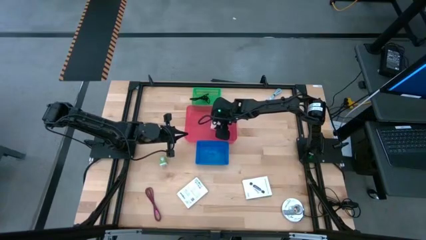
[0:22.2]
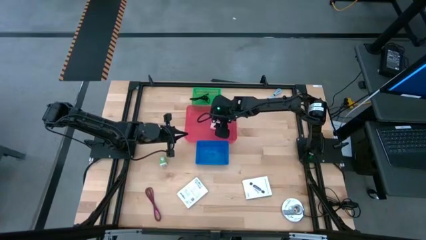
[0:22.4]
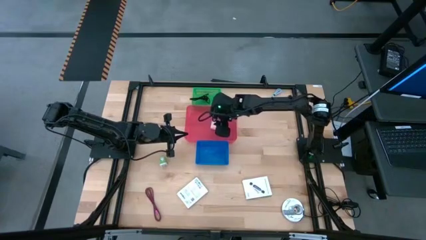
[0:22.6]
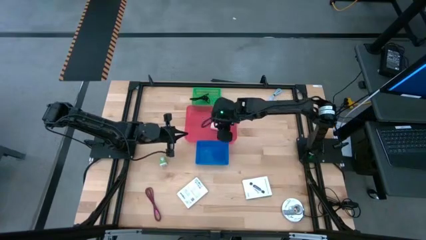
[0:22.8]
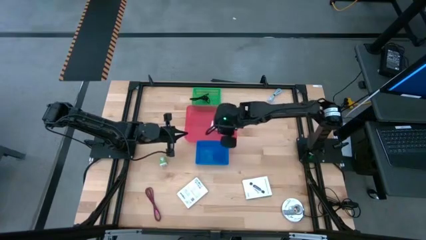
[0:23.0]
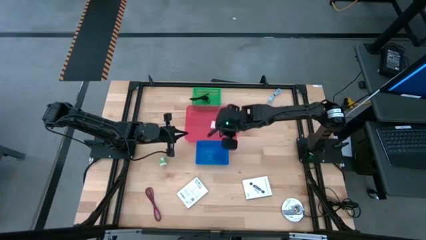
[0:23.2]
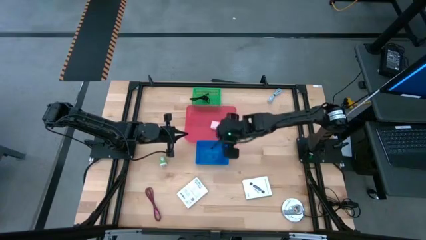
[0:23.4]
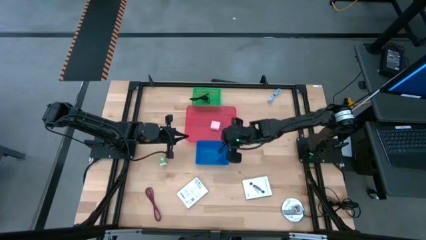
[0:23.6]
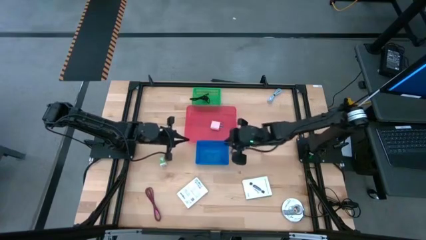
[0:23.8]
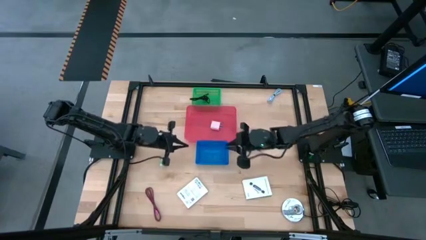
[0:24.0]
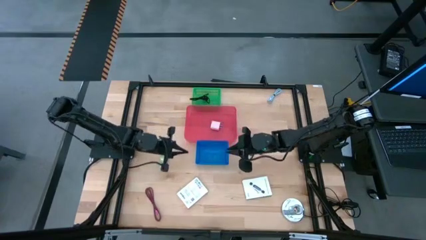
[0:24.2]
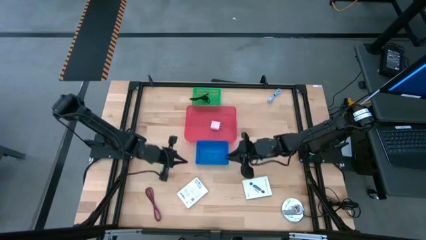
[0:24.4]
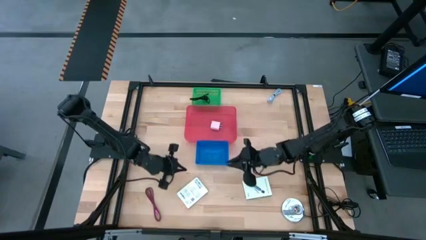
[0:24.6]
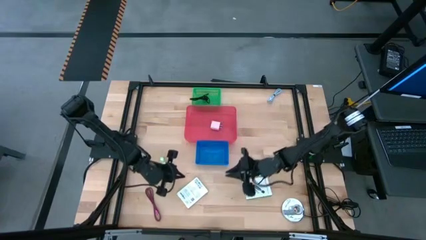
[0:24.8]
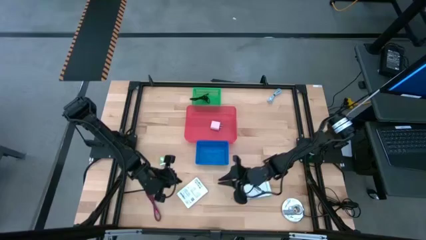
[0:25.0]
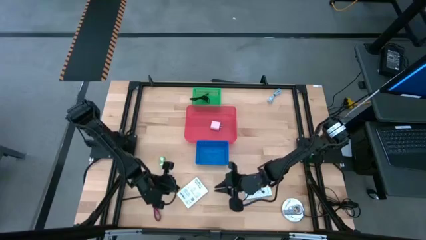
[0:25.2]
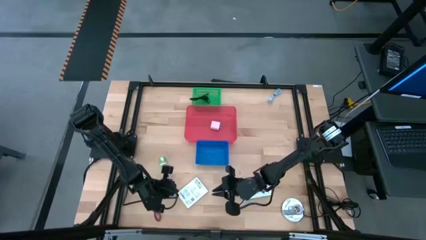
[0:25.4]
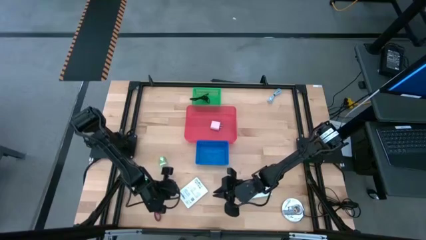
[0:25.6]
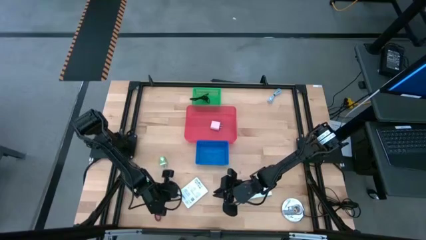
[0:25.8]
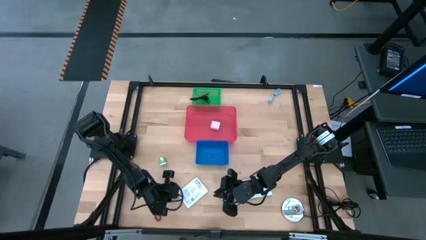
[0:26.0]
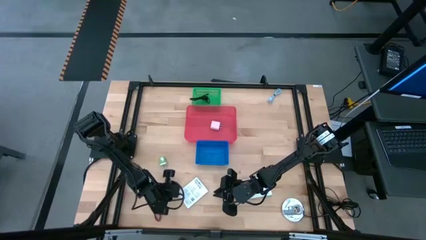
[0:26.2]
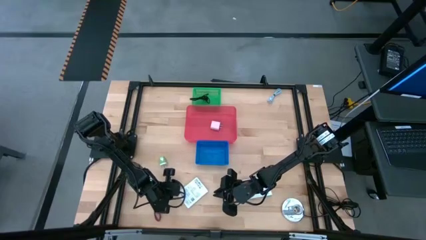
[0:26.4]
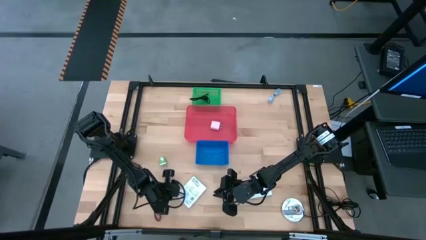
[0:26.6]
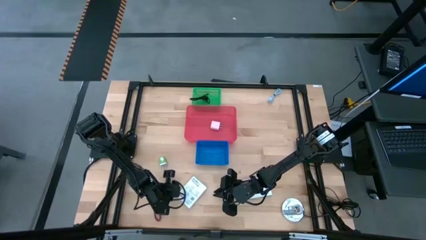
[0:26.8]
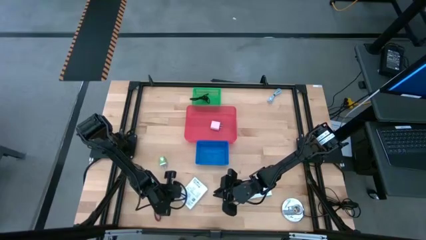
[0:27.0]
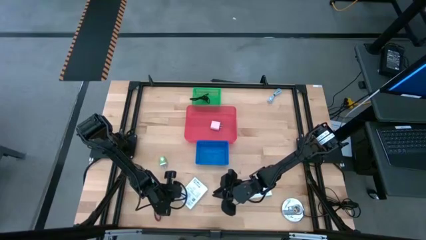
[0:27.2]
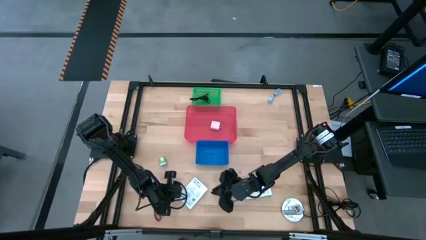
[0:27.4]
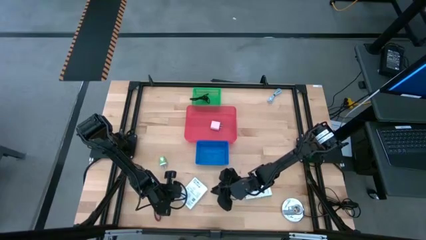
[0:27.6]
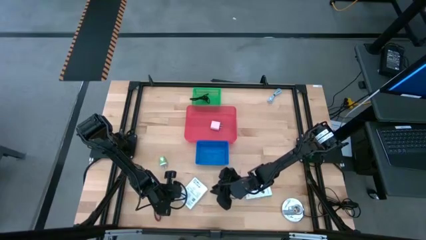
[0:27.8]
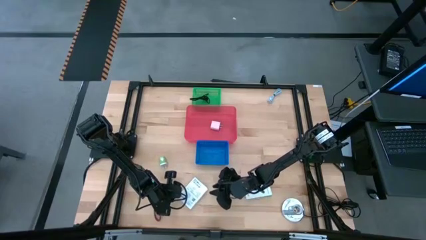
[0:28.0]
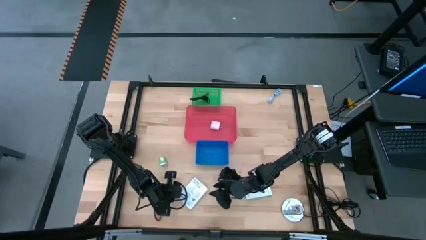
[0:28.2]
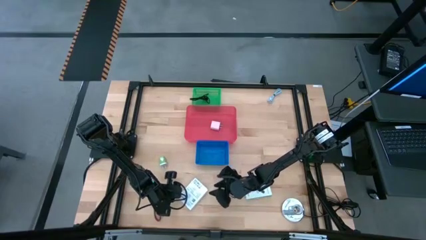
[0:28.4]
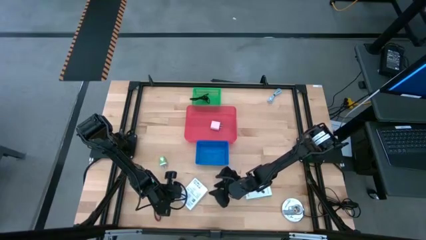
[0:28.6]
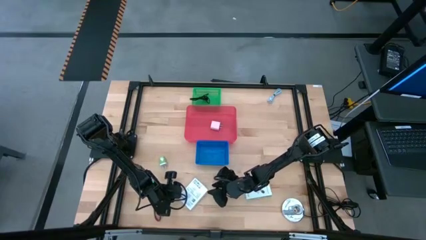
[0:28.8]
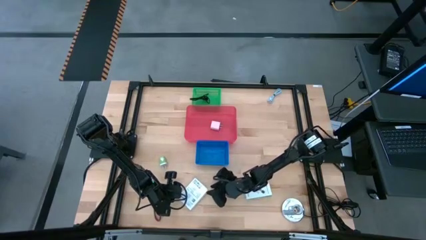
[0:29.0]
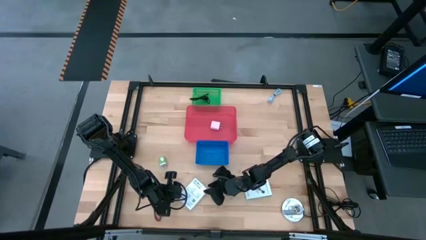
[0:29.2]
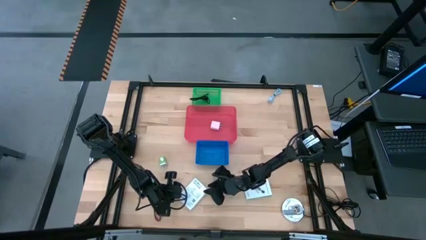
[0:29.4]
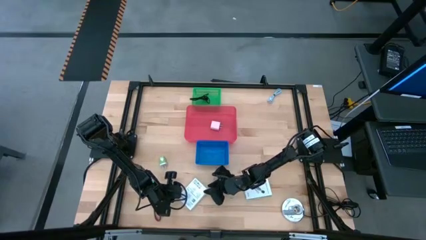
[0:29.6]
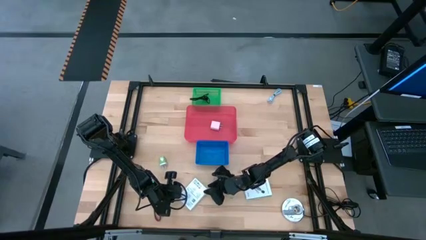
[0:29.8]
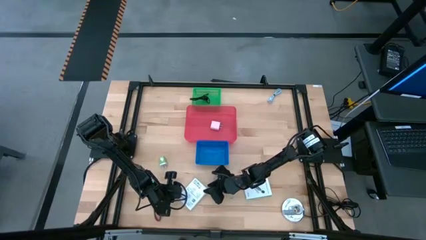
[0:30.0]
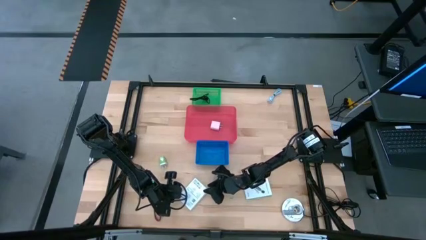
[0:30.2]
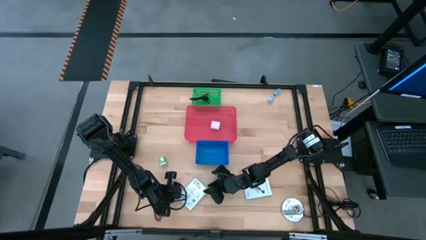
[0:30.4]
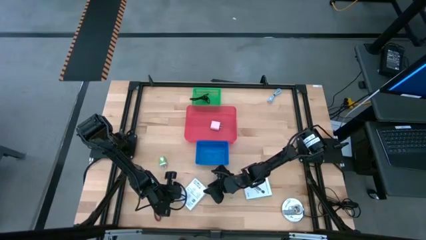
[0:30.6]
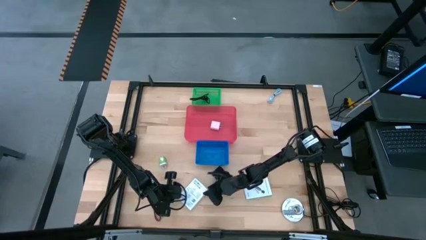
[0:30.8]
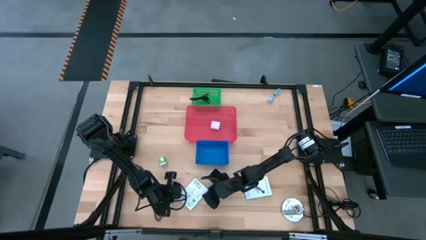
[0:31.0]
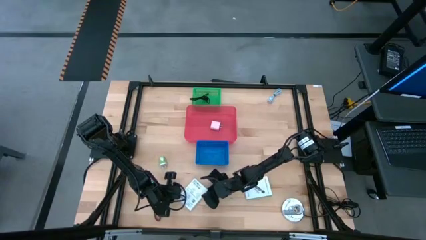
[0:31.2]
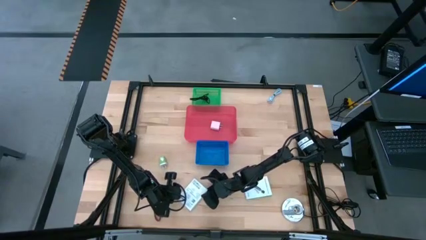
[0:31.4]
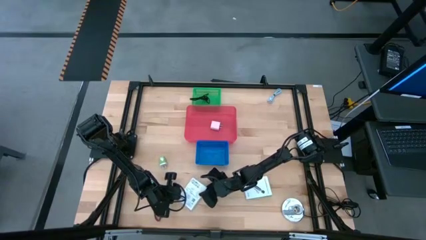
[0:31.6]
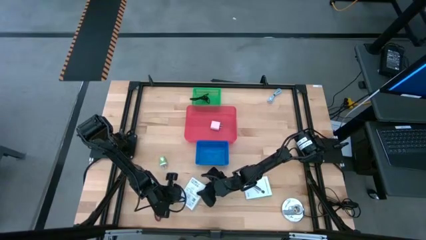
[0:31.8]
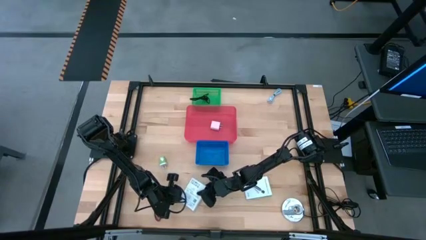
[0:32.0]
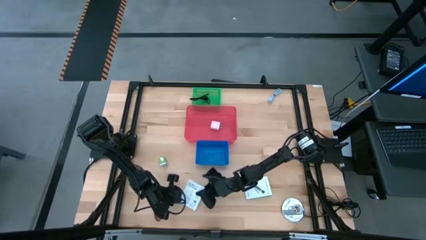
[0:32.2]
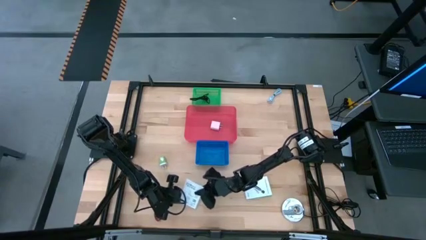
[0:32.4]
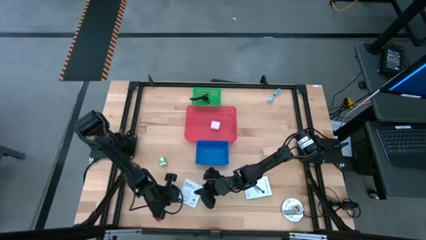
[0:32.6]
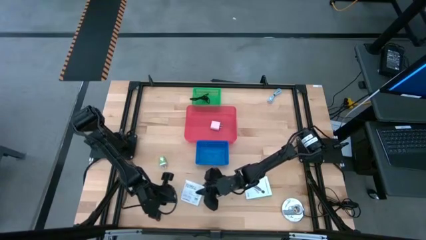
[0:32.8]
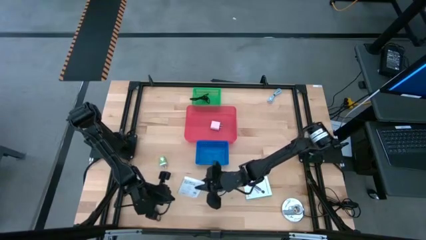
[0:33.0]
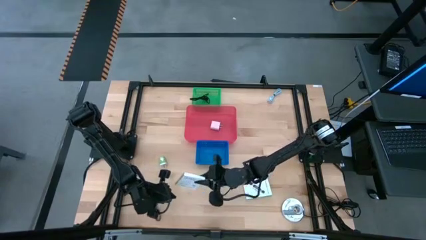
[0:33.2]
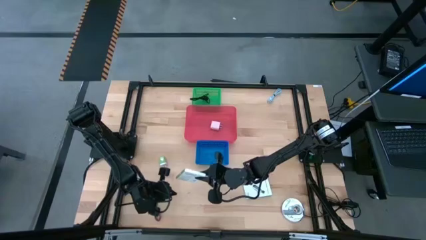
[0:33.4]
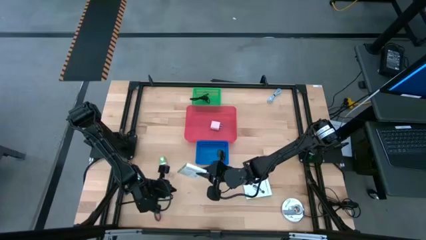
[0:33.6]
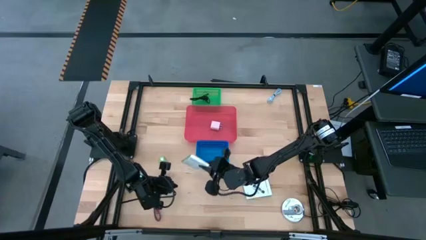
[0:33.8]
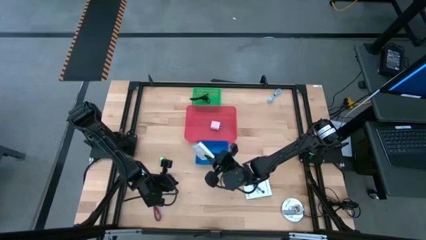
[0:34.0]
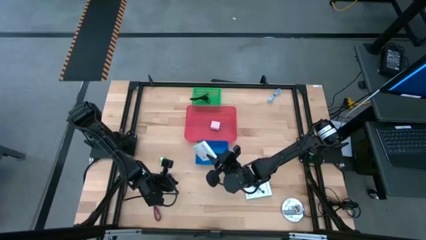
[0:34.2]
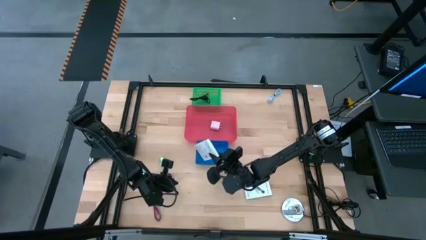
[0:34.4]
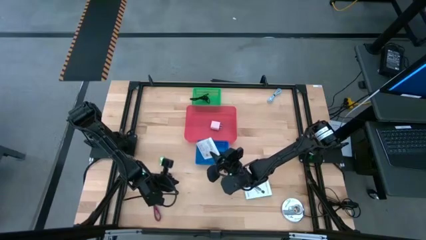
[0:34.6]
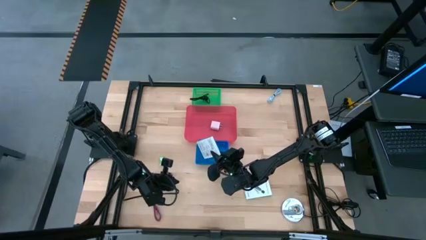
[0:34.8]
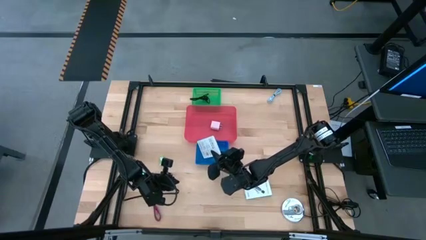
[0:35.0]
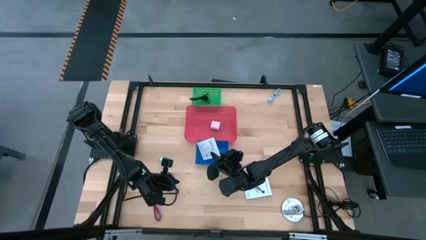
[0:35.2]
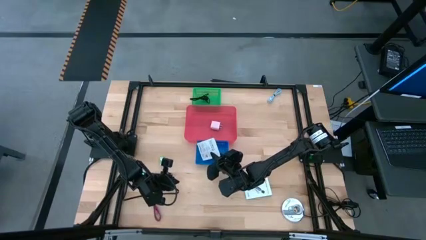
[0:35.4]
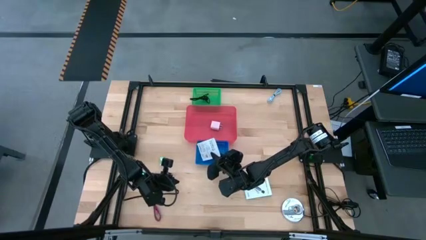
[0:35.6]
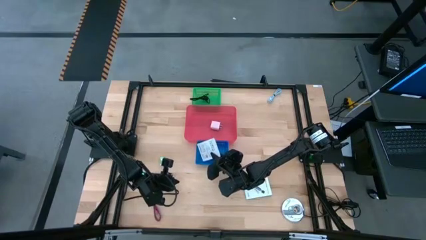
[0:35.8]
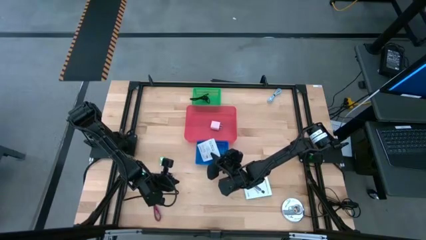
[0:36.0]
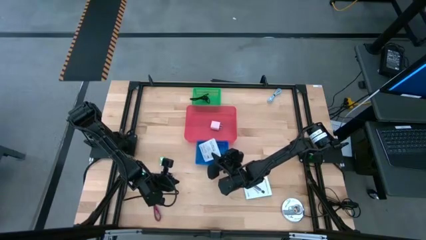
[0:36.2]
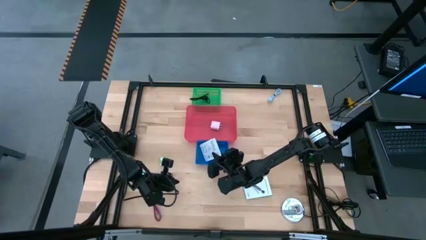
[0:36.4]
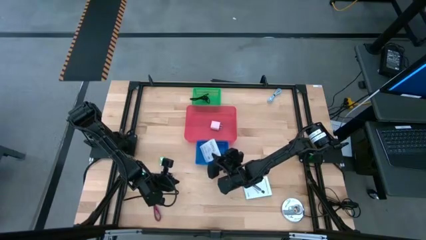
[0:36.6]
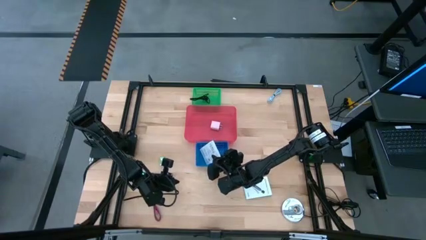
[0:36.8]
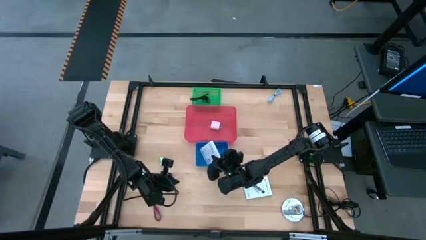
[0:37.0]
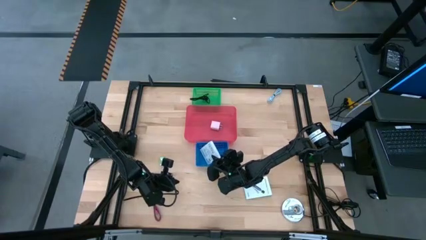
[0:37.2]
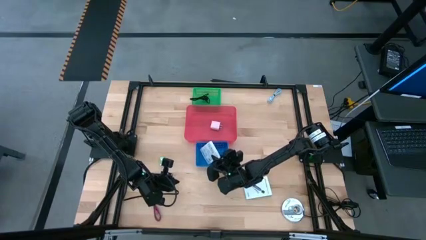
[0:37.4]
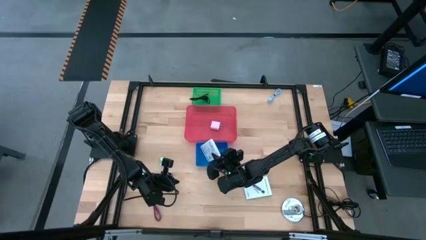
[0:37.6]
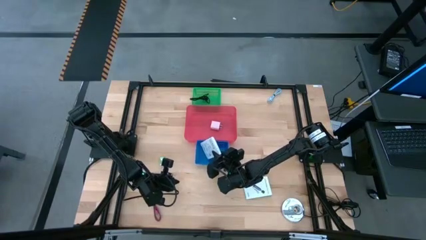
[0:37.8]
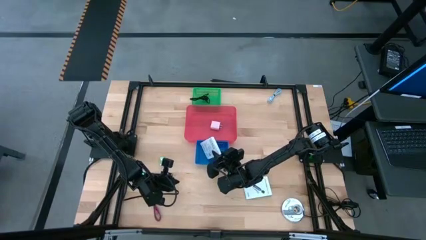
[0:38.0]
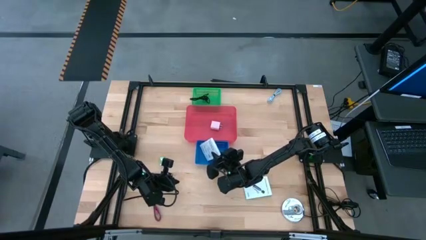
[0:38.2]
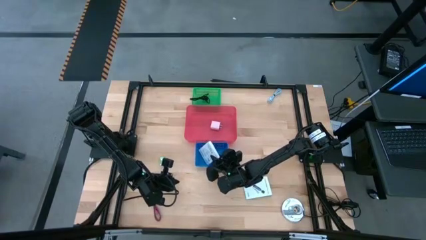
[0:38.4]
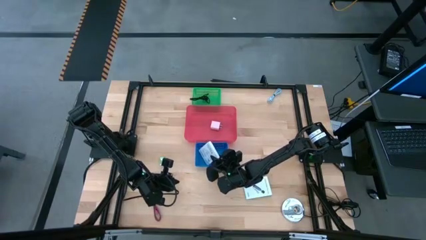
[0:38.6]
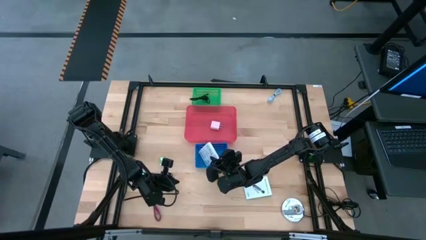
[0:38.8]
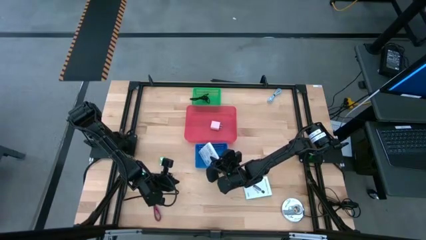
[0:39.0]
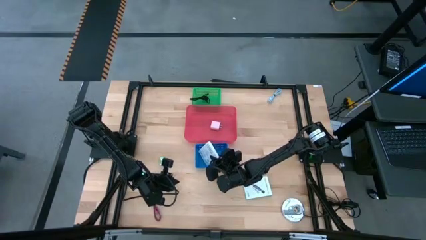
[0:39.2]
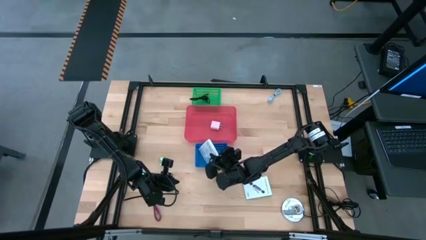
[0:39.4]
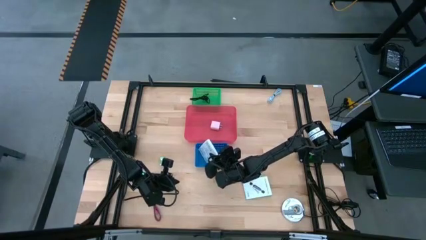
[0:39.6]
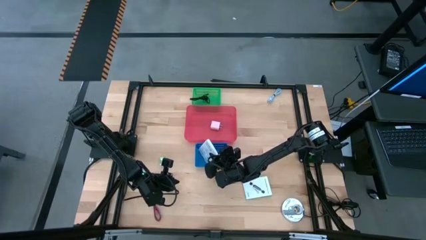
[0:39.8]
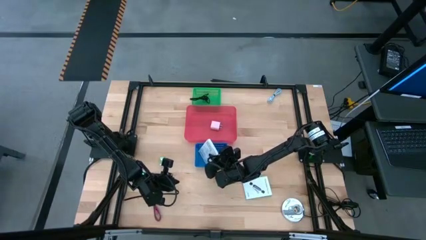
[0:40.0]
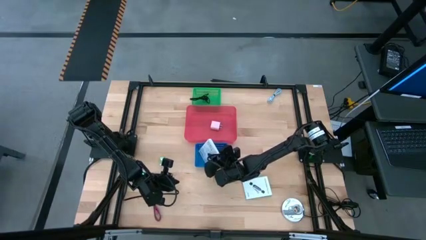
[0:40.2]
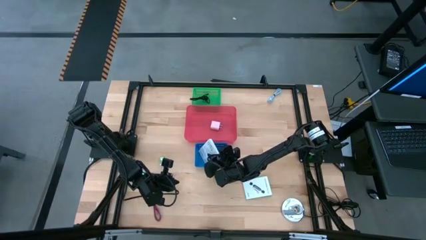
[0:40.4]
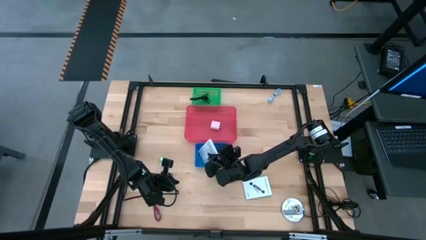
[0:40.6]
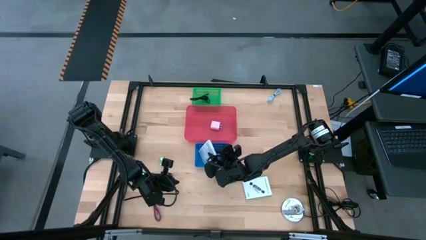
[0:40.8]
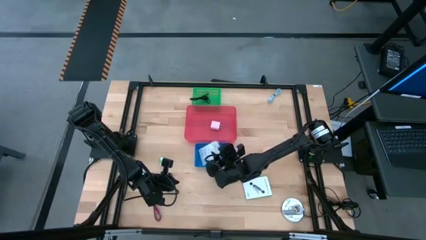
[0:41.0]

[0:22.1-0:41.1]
Task: Pick and place items into bin
Put the left white card reader box into the blue bin
